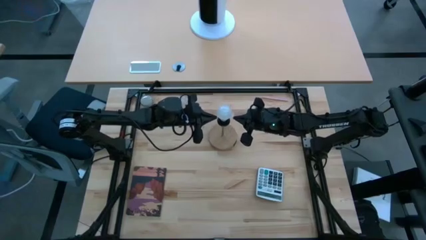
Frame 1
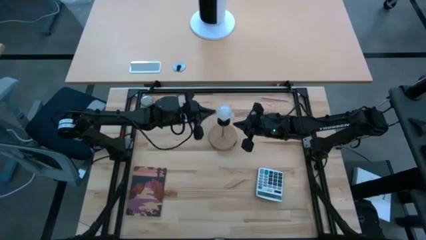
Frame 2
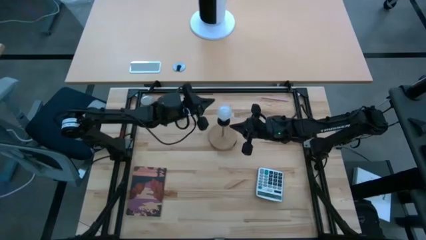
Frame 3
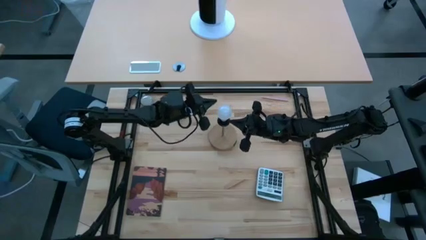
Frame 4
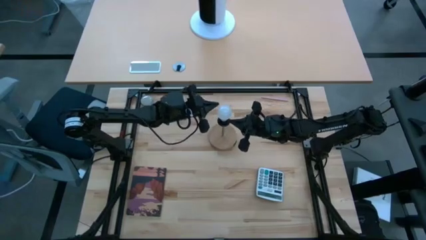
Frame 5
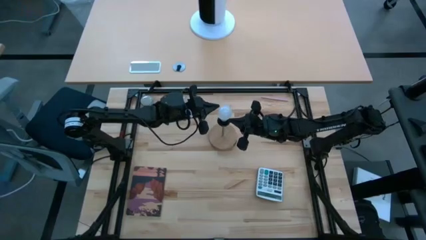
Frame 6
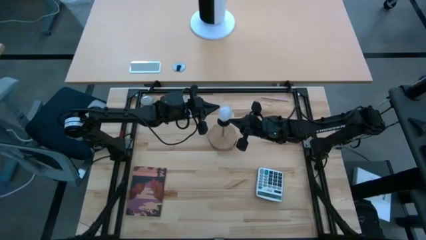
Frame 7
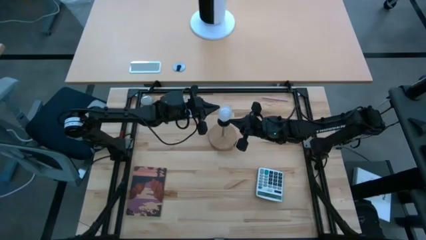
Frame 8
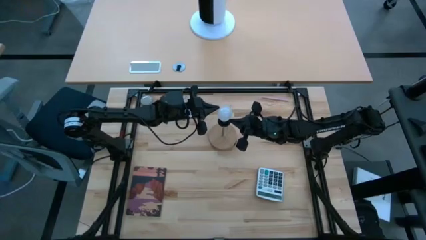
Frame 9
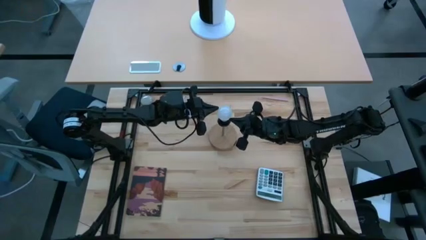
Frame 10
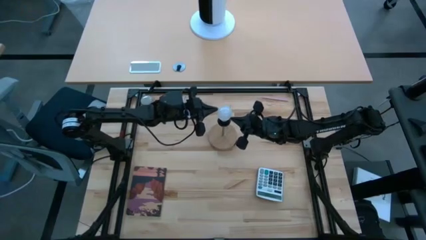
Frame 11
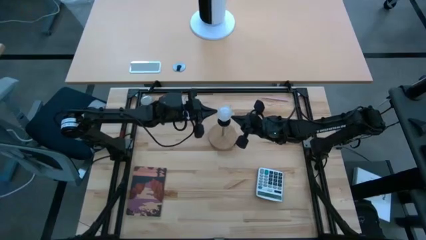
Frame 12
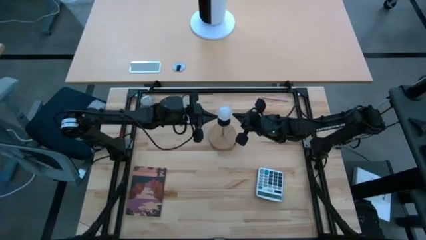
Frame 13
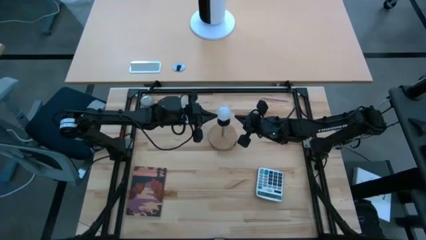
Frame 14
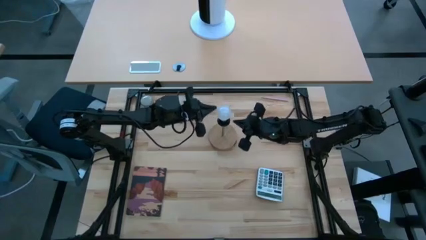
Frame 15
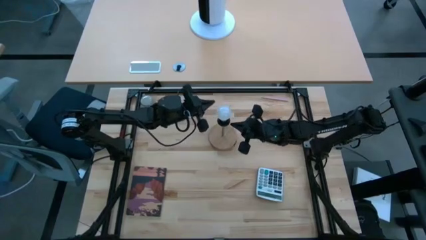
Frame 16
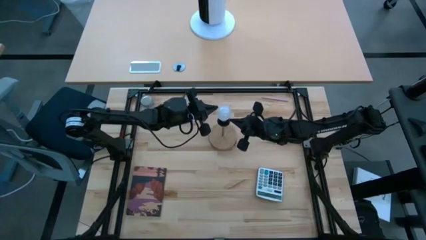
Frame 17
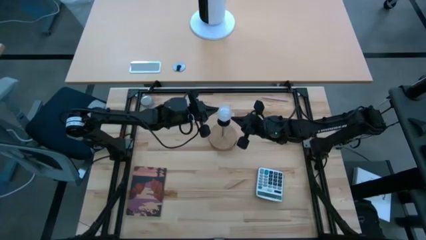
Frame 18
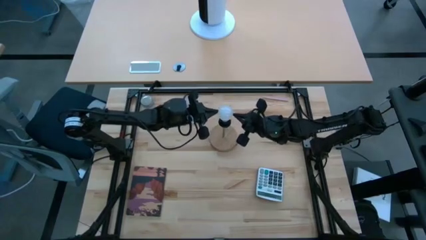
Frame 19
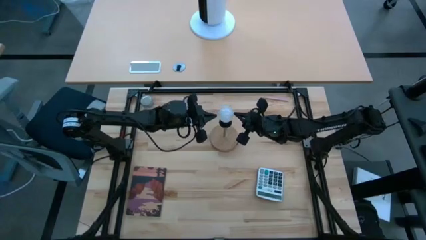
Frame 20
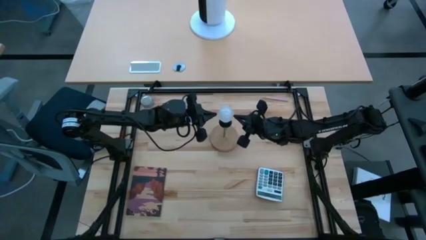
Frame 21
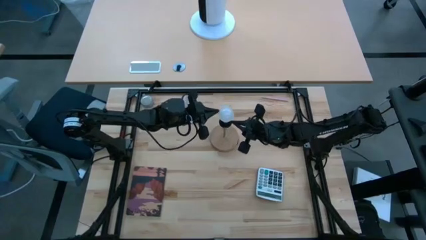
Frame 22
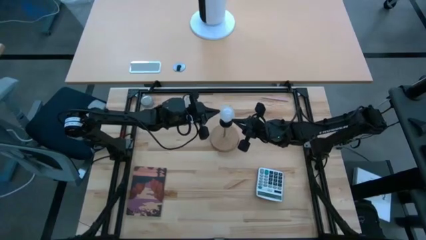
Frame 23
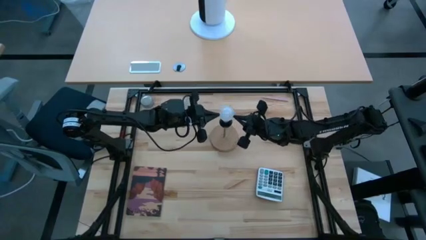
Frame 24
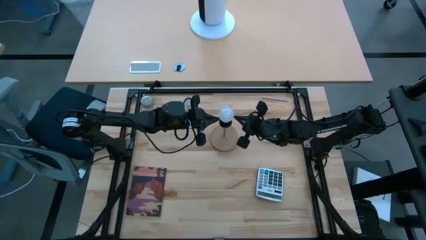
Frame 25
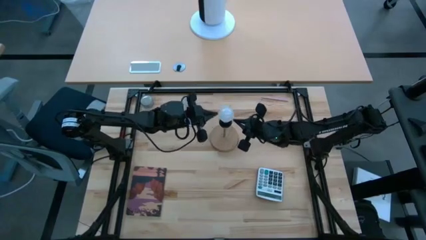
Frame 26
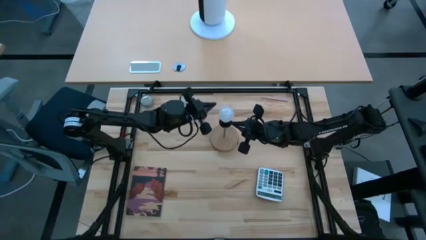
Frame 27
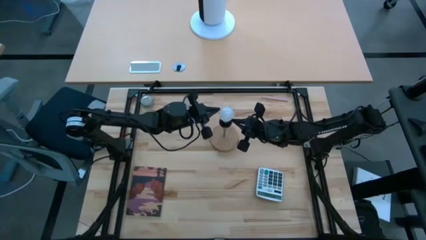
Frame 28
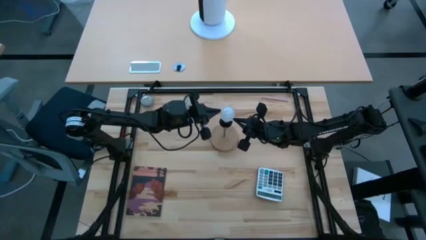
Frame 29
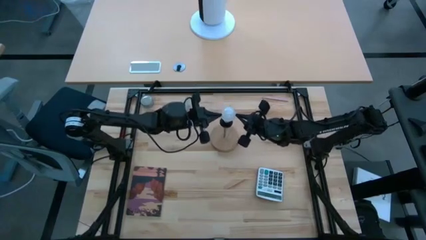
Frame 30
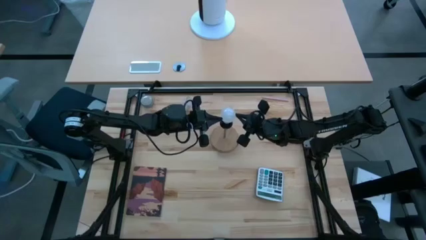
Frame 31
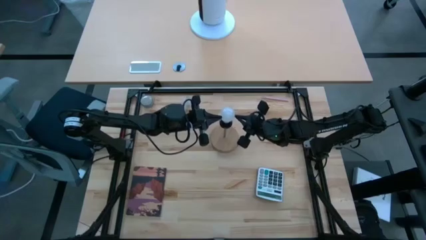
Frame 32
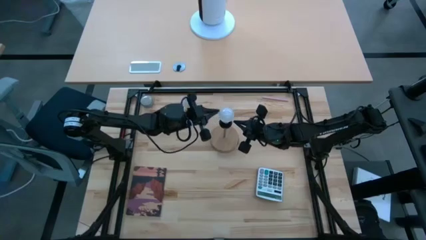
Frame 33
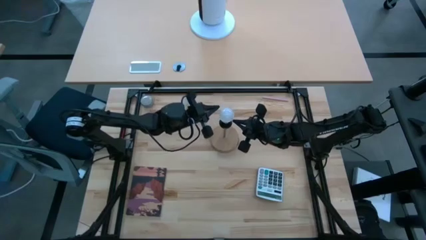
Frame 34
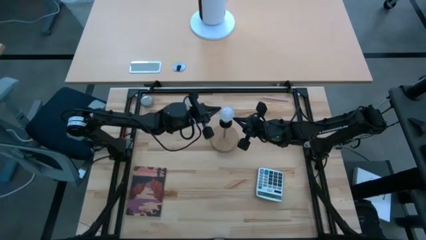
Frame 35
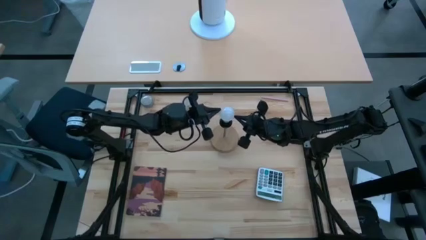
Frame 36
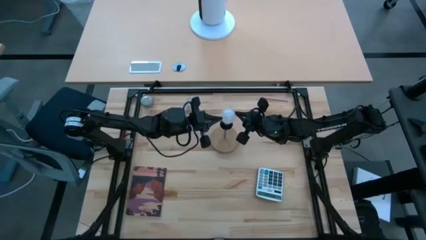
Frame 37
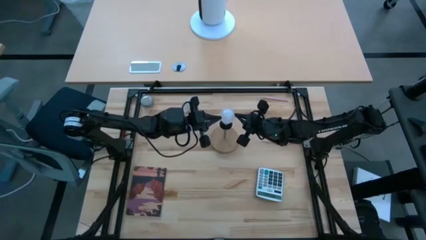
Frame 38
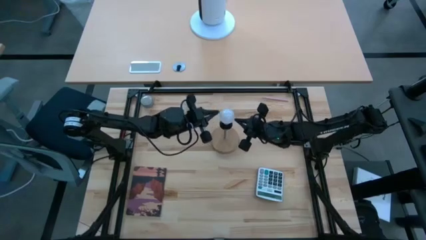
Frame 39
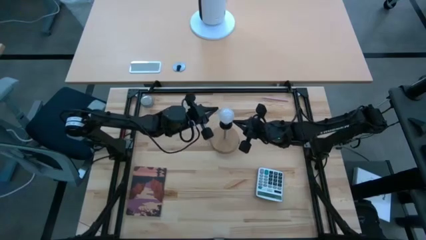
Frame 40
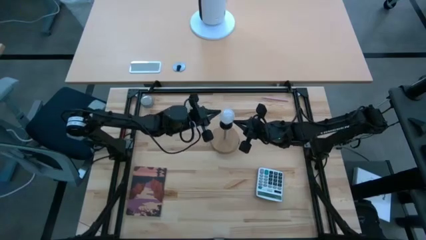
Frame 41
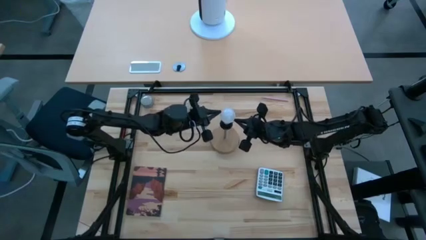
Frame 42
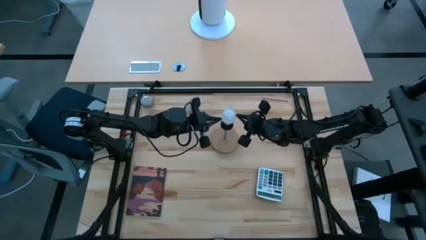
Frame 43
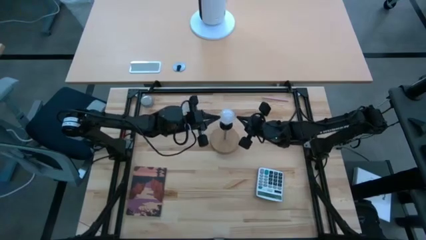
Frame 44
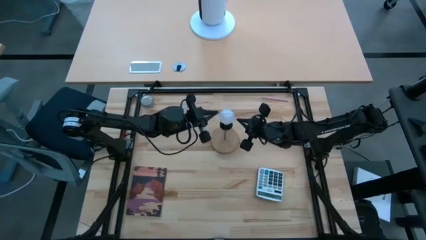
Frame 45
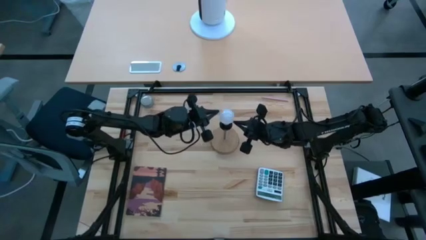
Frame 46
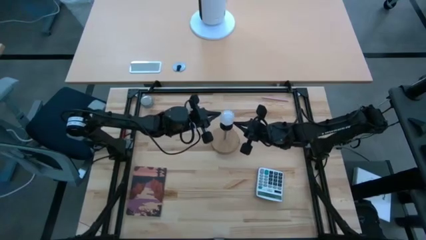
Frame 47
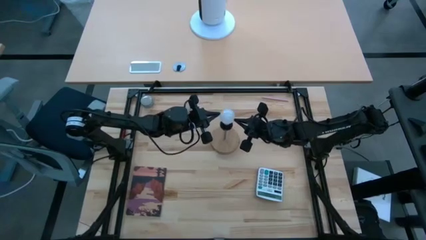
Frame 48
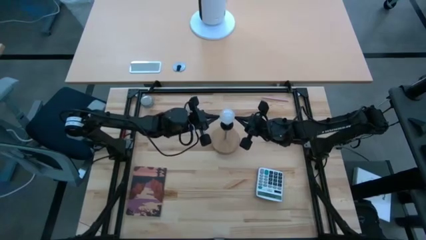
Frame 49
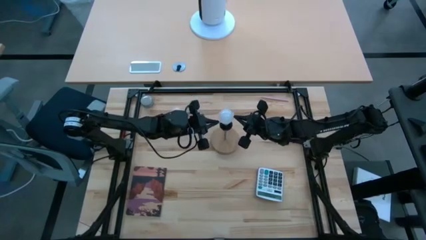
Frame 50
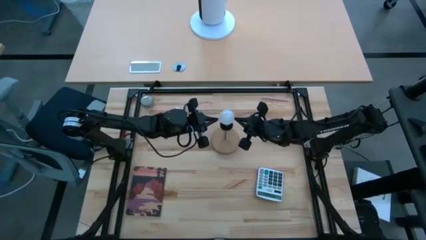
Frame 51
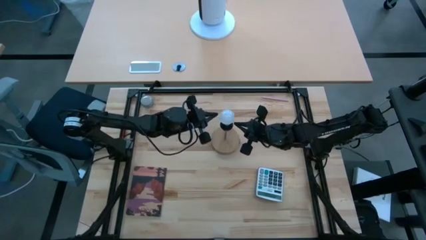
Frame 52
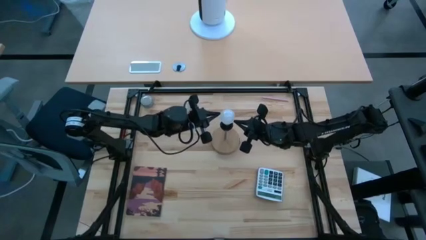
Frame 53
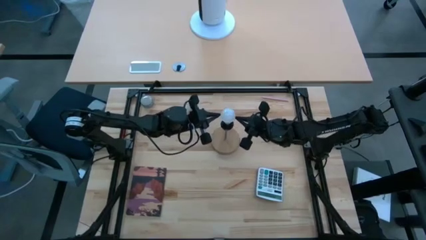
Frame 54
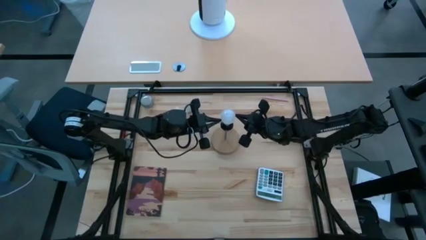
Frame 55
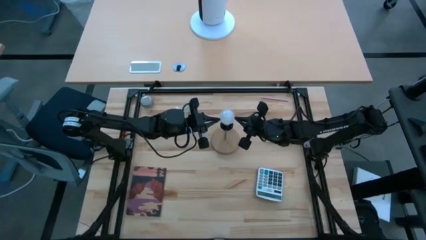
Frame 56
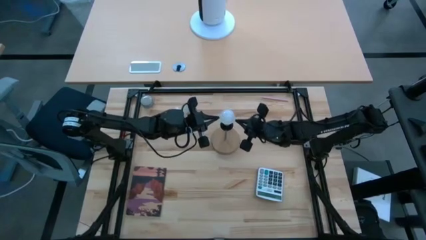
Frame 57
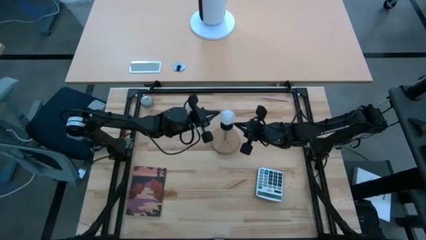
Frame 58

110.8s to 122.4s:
Task: Screw lightbulb
Remove the lightbulb from the lamp

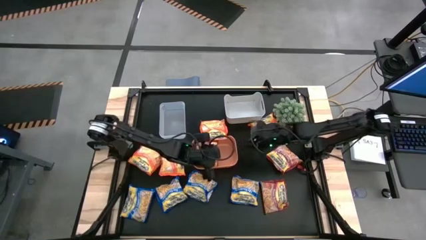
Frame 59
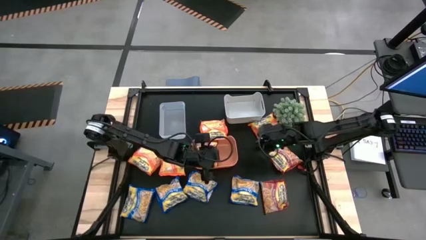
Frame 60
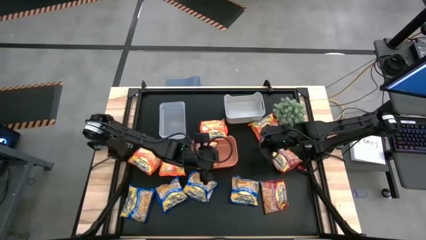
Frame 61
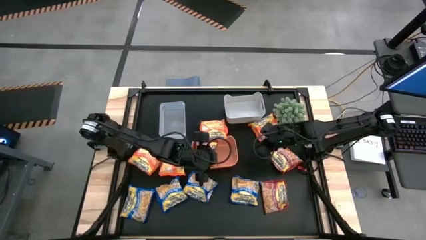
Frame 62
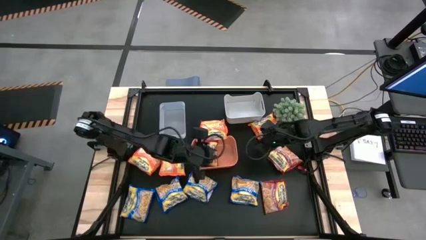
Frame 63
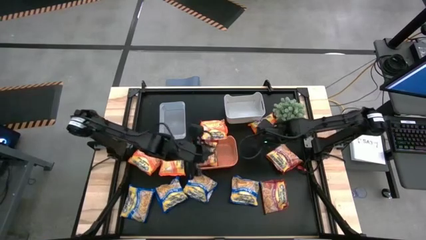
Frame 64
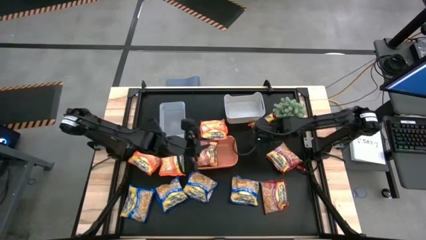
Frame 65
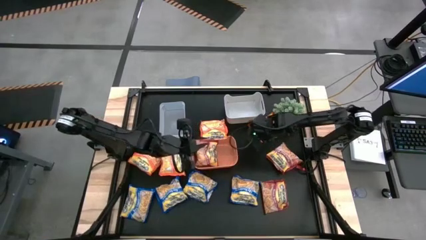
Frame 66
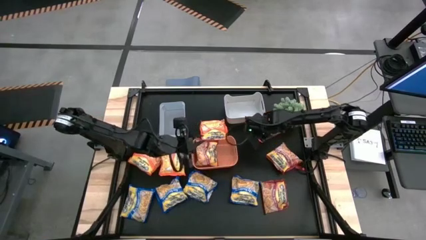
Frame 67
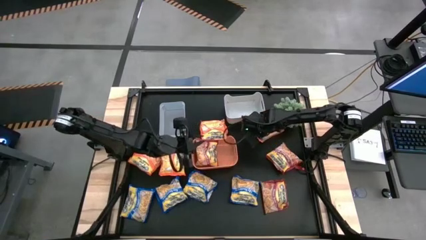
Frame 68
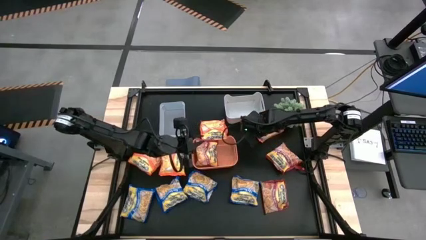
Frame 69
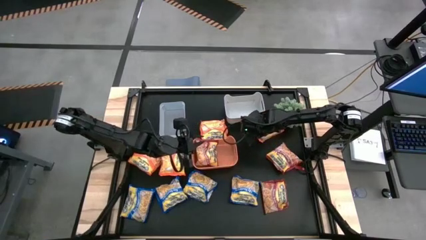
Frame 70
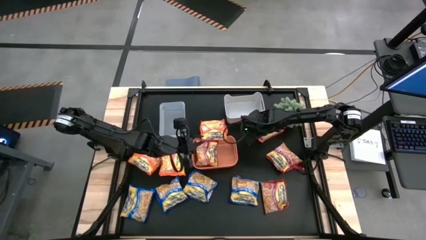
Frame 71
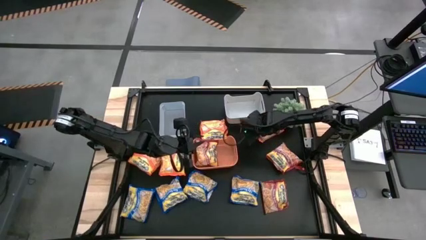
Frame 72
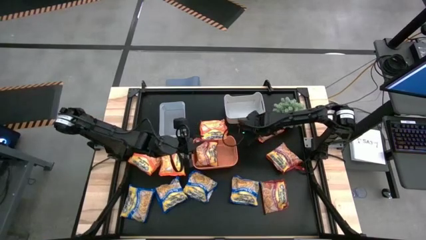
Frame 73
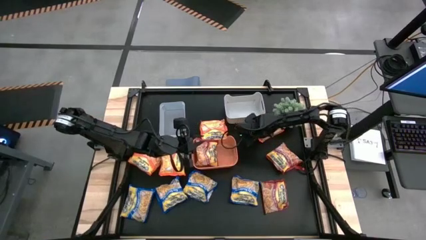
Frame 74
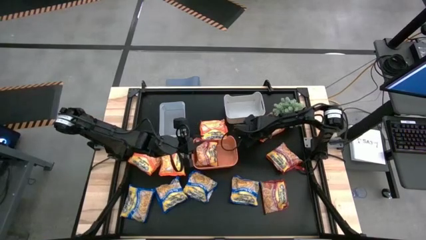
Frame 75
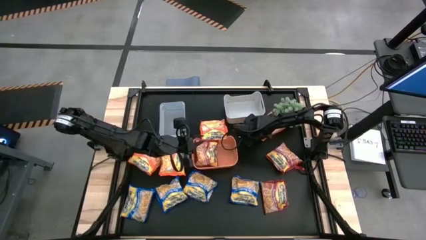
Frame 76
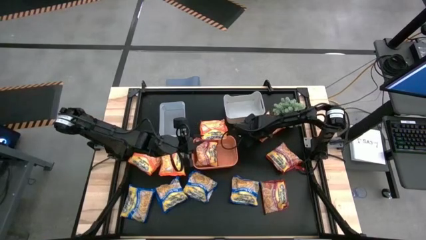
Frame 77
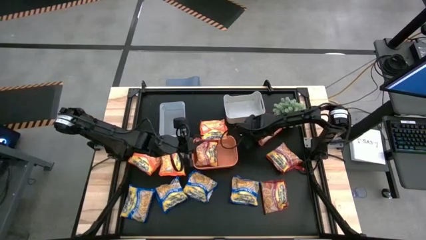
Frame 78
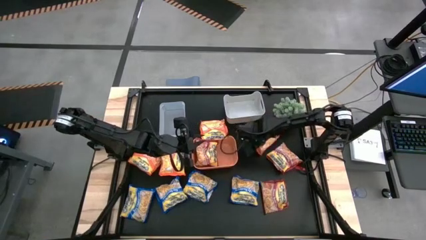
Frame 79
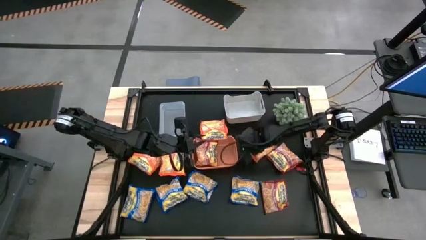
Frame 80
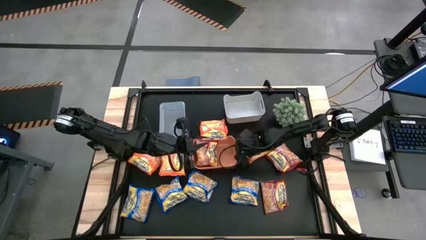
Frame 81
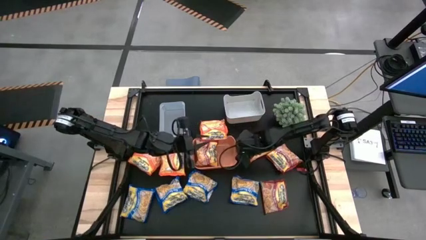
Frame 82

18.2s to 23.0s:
Task: Sort Maruchan noodles
Move the orange noodle packet to the center of the table
